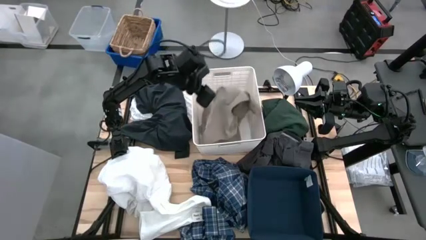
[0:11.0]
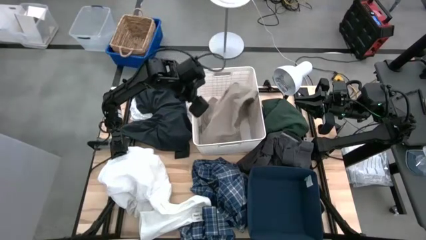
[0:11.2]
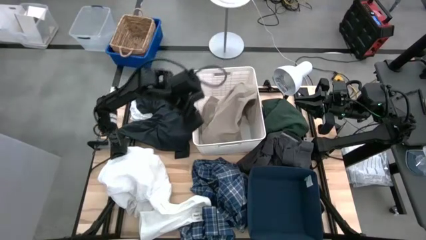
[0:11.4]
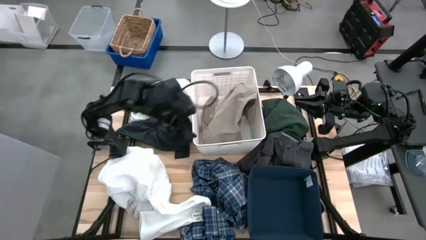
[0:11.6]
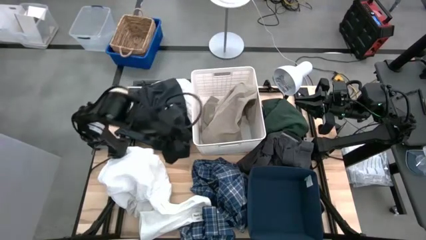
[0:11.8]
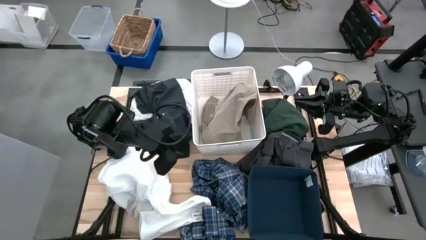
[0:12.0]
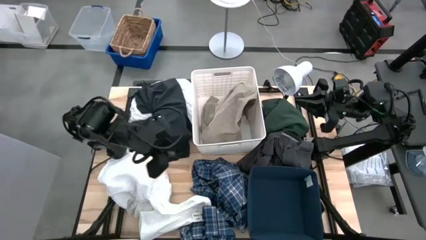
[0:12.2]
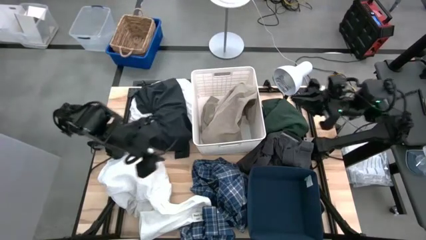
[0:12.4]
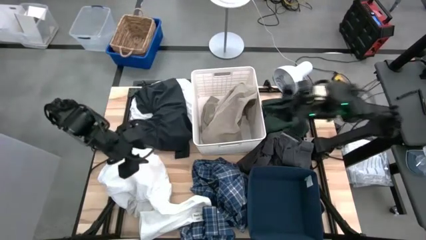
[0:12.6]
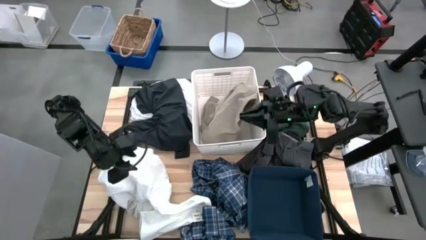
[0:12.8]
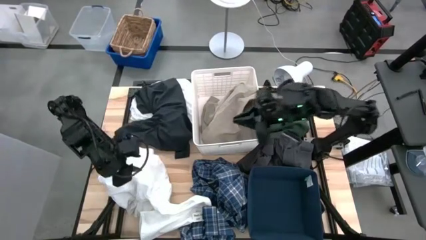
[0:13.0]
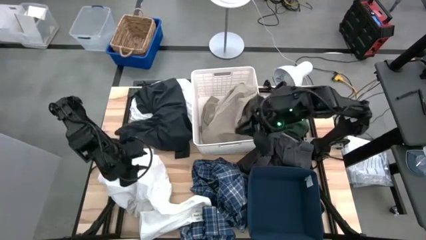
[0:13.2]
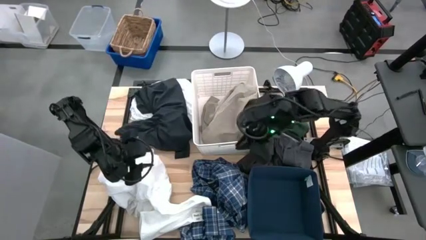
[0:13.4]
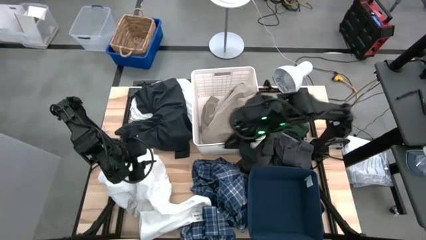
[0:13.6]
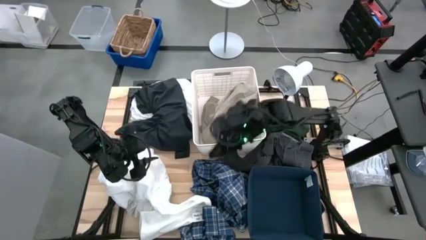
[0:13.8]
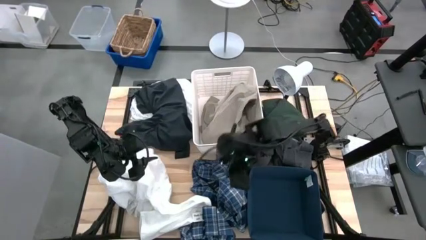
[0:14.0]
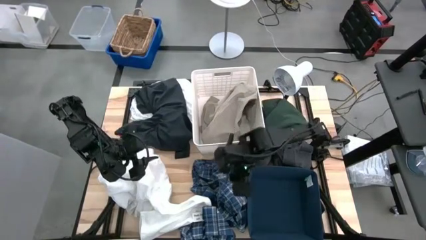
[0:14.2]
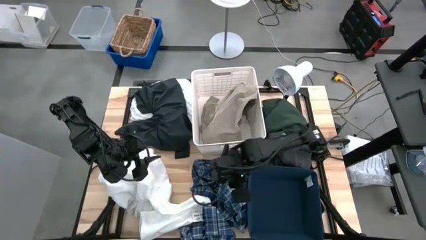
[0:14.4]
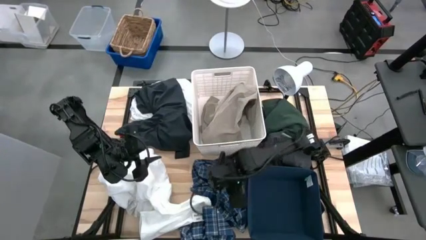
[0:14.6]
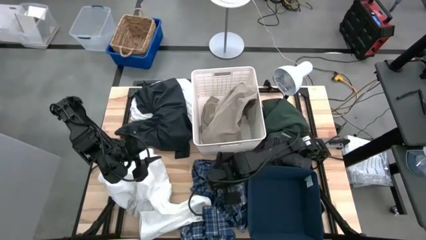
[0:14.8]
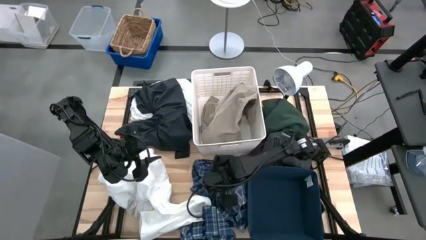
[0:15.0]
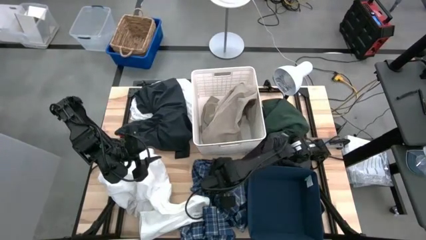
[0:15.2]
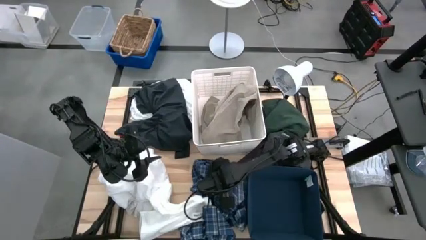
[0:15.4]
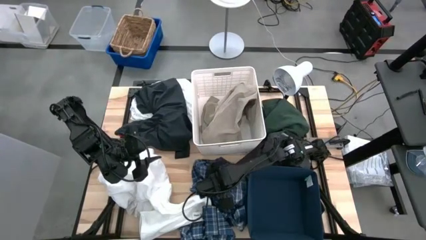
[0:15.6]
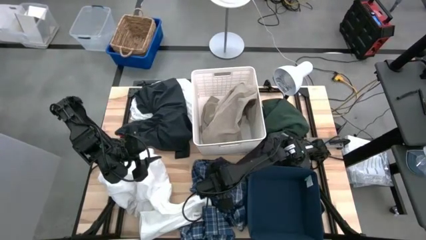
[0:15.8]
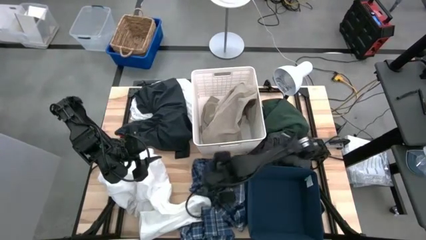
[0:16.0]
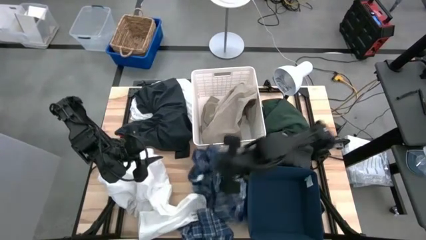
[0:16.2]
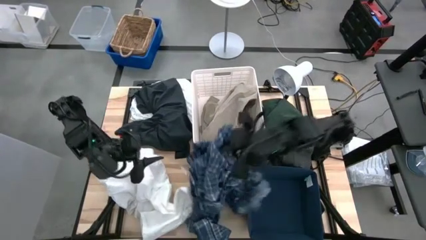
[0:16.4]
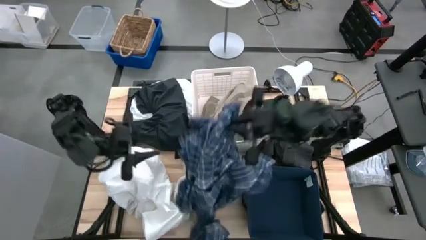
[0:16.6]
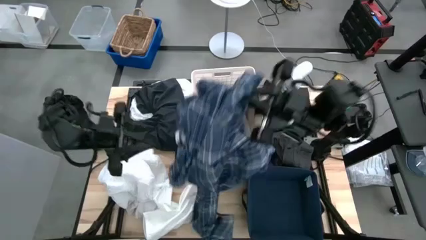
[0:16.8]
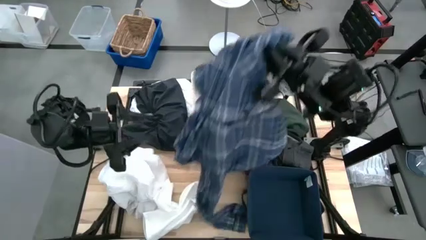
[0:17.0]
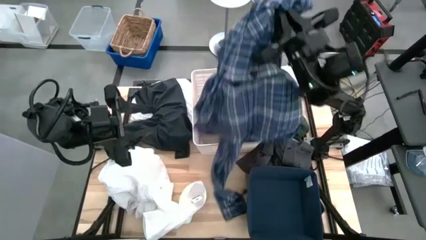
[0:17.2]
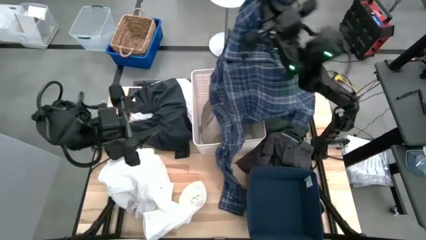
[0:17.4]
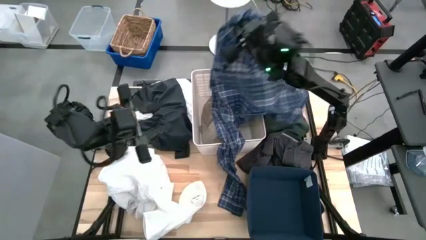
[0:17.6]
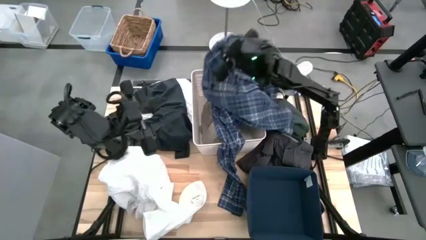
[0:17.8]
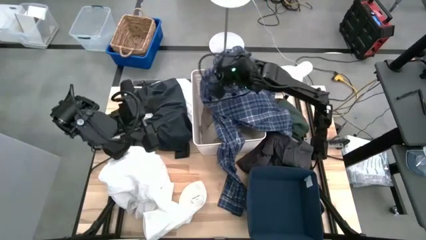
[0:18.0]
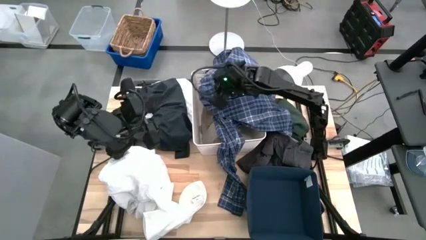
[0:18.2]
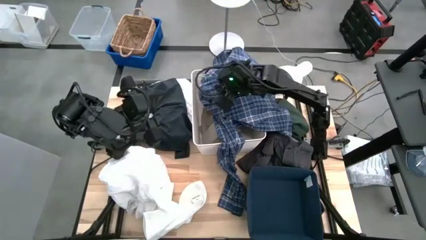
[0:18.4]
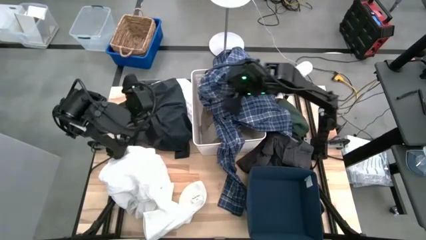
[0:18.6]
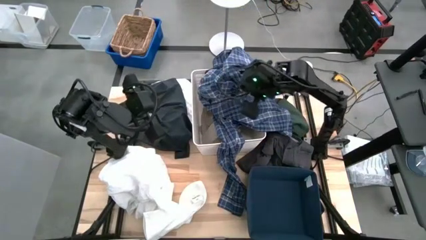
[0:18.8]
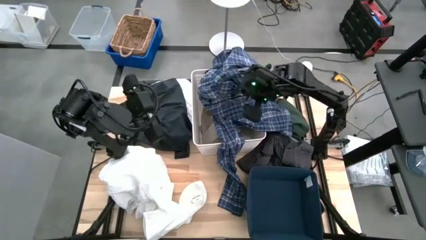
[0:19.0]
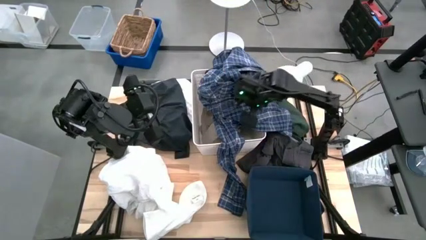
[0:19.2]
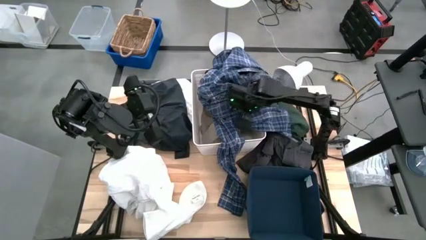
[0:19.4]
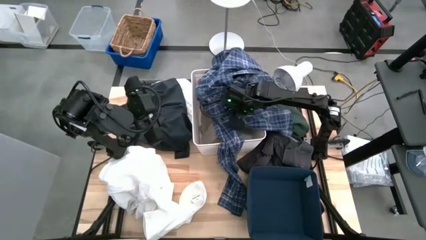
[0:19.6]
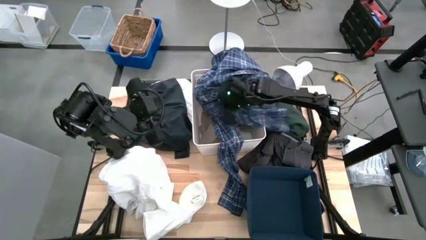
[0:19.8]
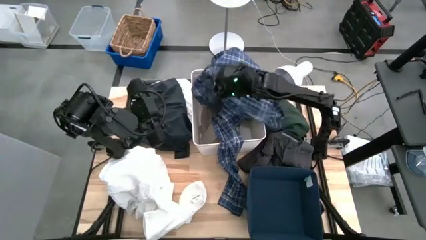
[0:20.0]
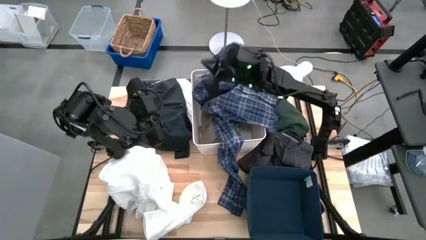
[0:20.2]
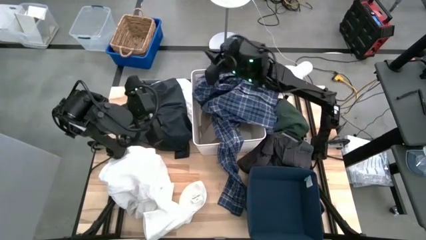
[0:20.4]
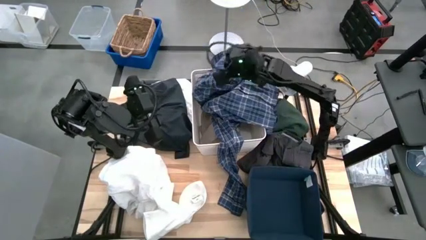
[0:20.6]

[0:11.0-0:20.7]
Task: Sort clothes
Put the blue checkered polo into the white laundry bin

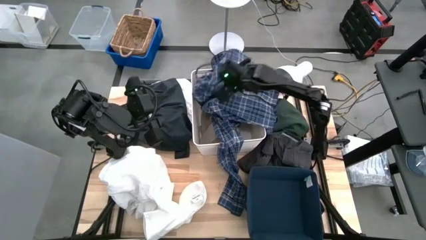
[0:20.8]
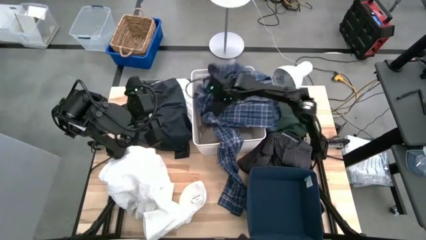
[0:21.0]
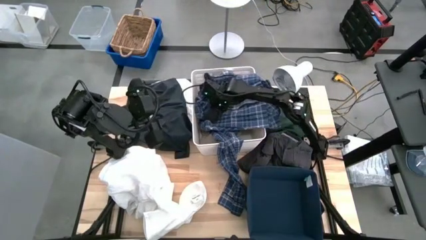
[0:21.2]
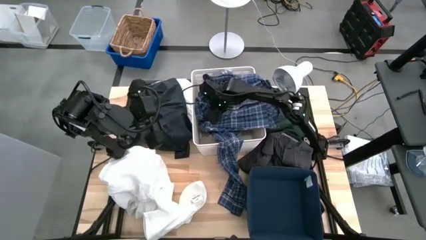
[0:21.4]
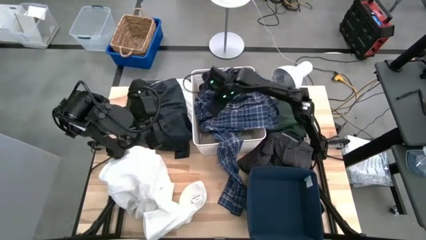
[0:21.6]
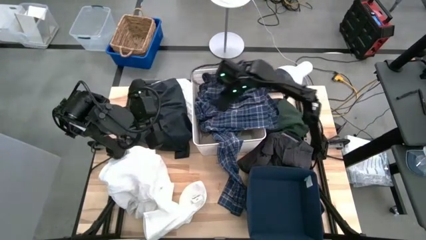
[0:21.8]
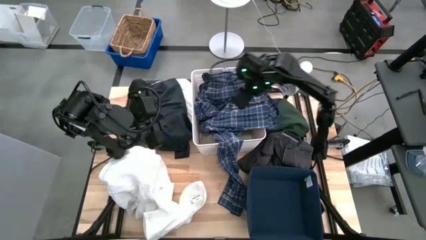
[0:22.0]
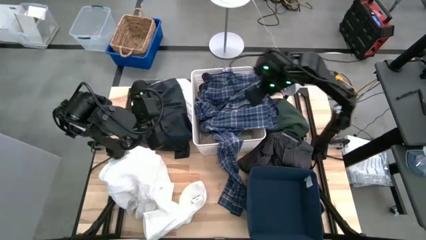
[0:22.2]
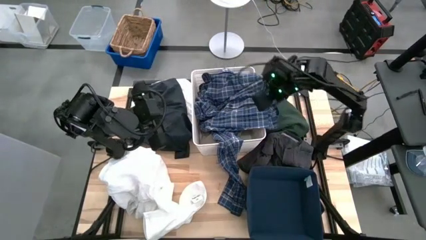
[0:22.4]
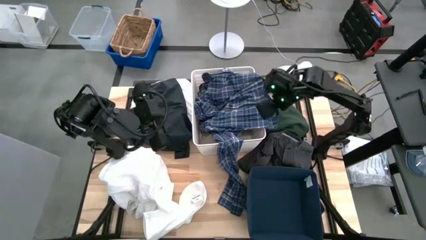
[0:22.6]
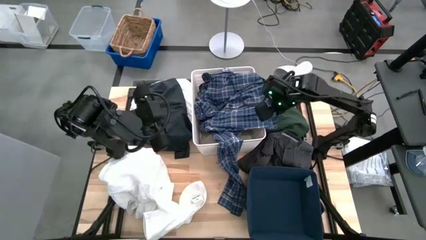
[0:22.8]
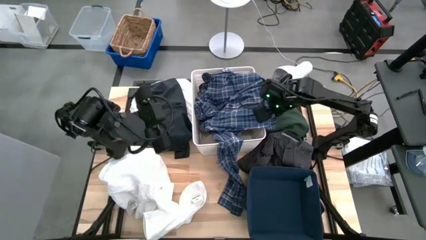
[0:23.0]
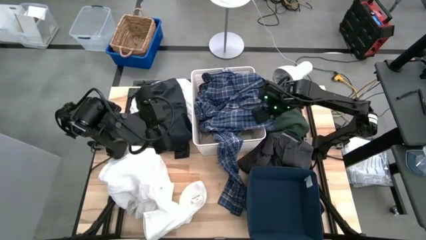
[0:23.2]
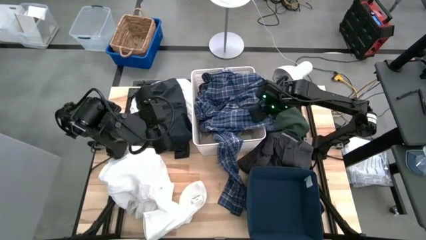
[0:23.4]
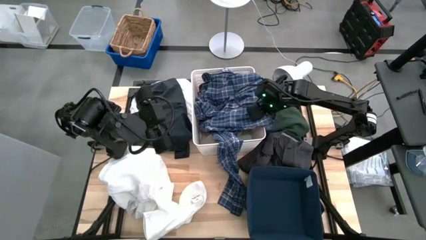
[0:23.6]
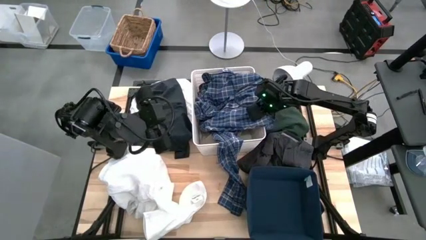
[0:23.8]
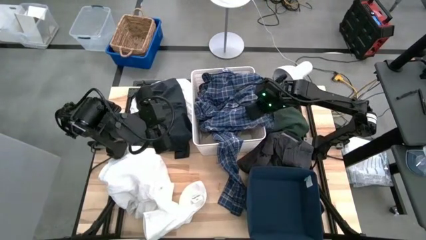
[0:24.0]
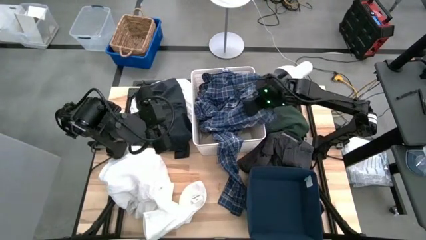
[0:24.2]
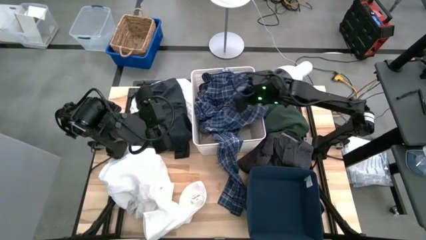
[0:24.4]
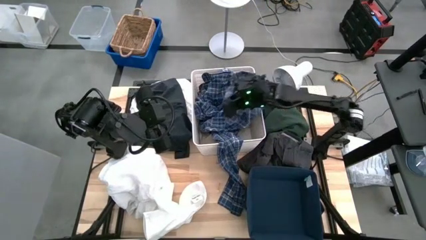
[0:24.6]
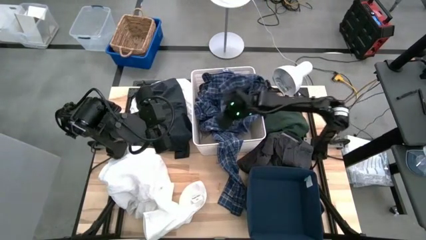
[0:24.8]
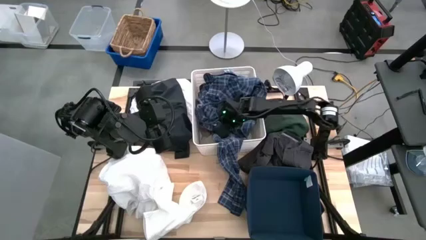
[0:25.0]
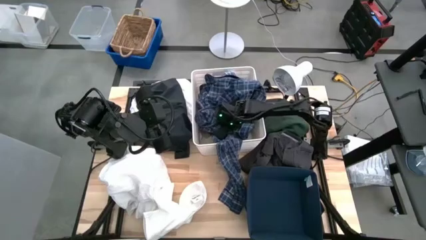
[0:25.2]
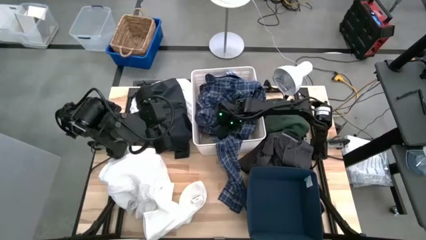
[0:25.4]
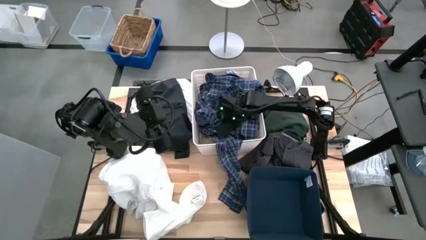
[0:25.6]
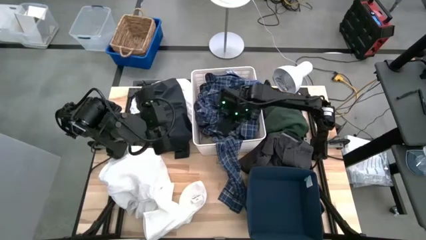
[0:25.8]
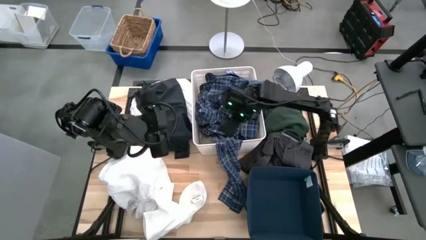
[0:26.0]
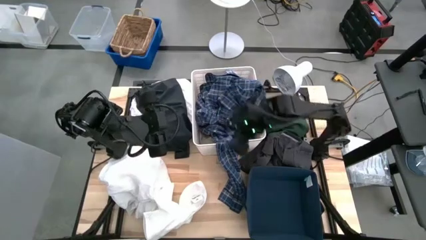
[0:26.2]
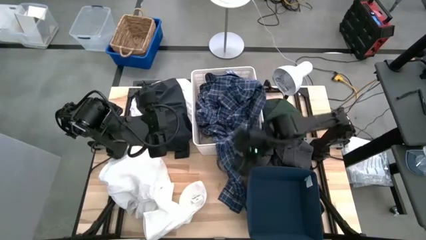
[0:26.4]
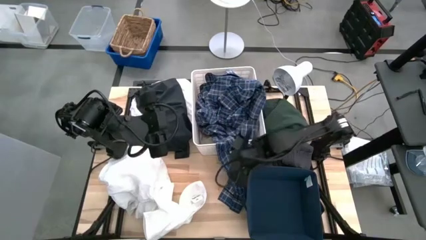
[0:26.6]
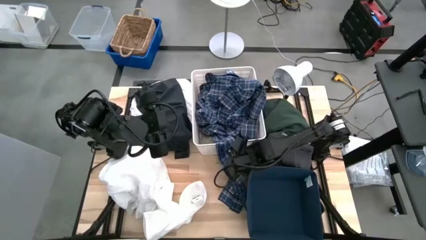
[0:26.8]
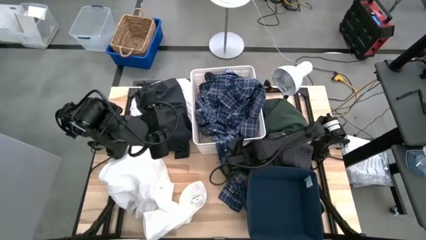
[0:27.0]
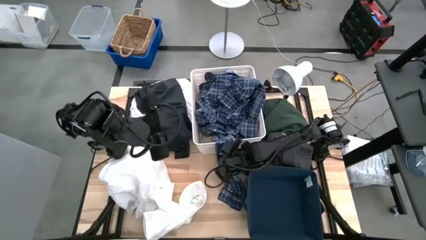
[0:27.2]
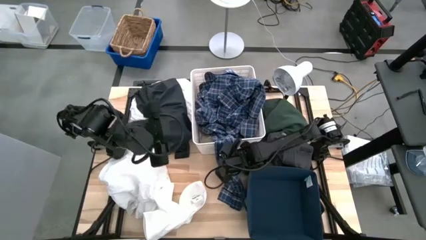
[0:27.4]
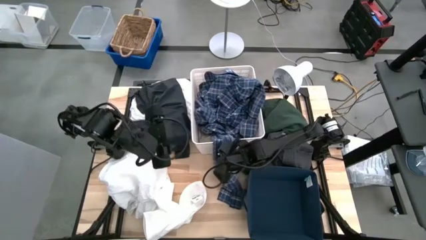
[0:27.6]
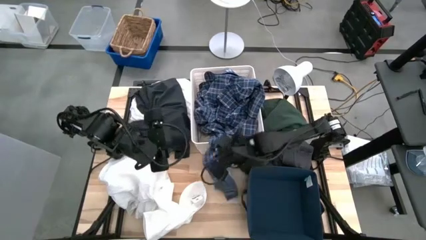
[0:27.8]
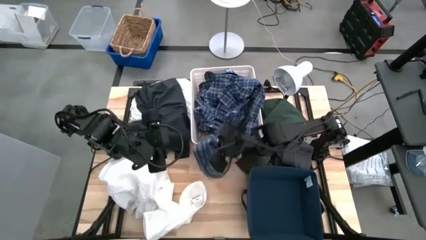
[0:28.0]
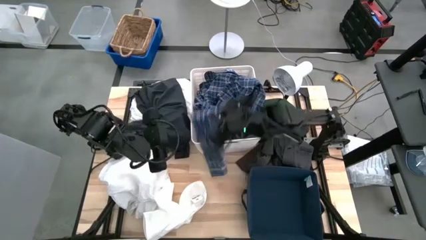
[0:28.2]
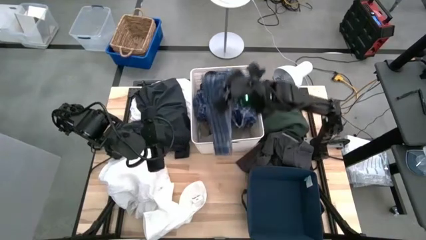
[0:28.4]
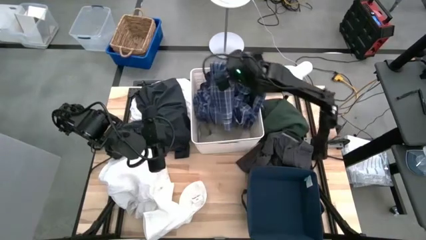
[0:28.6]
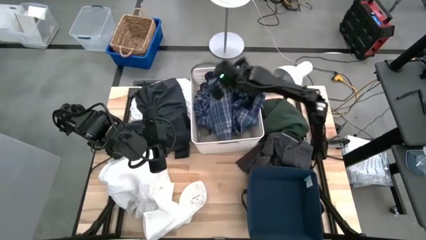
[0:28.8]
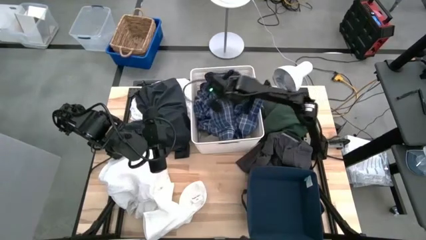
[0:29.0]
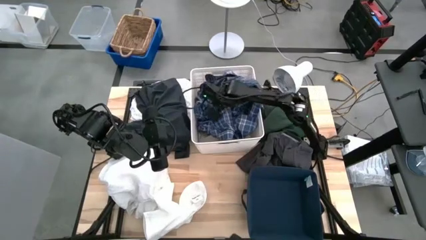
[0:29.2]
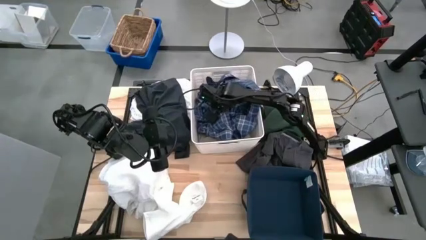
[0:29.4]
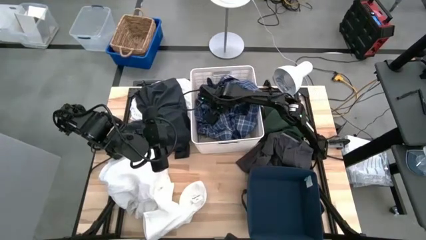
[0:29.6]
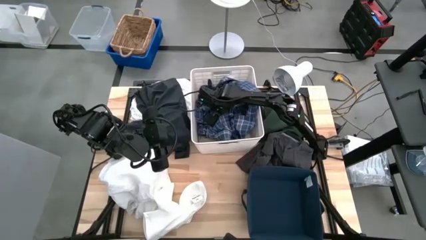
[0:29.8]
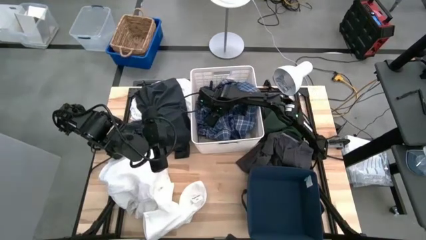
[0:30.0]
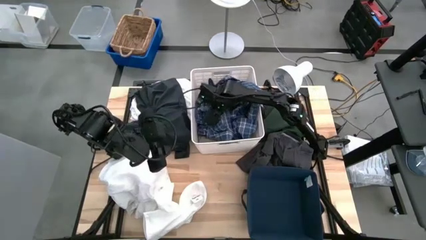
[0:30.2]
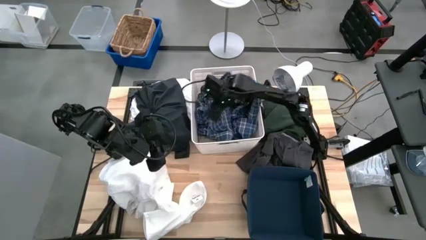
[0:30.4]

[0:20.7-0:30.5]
Put the blue checkered polo into the white laundry bin
